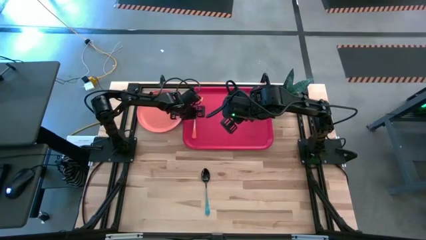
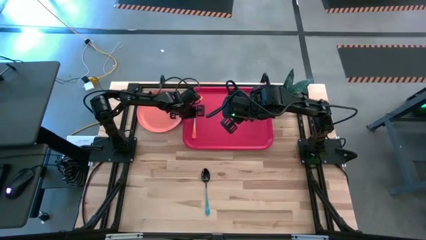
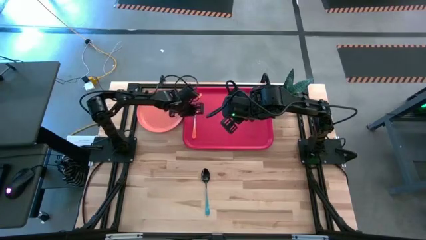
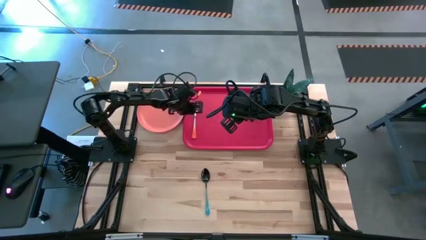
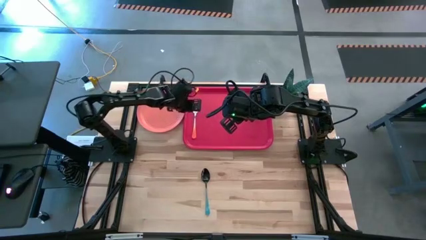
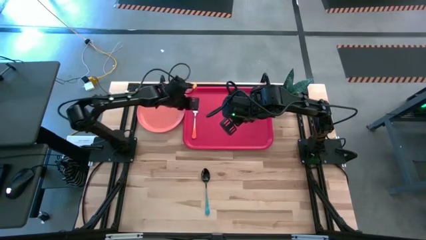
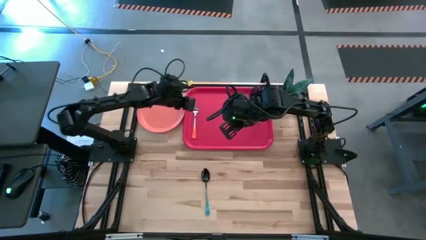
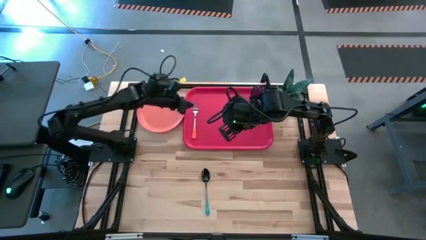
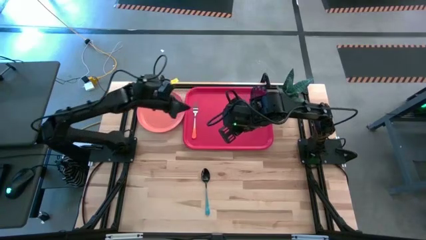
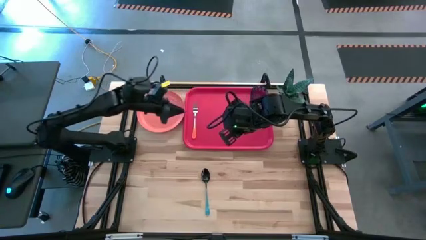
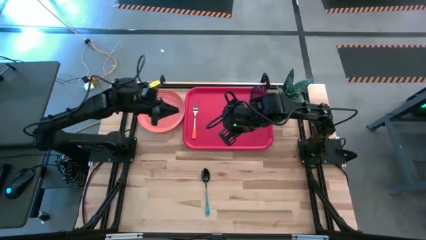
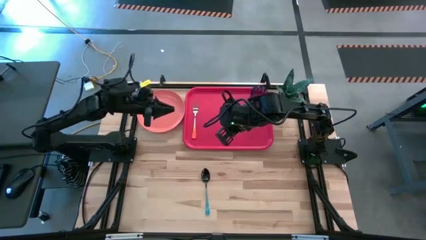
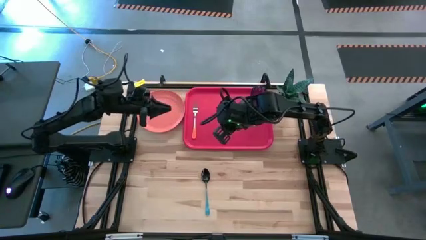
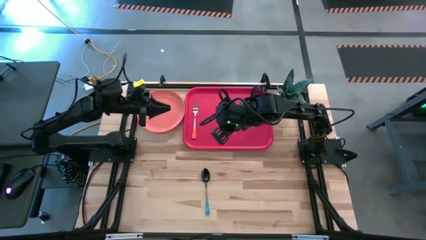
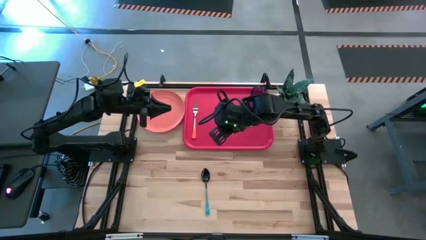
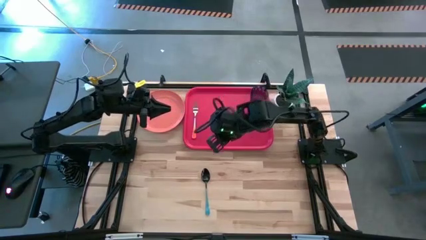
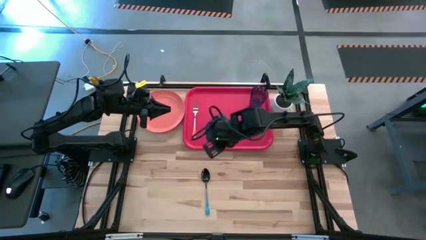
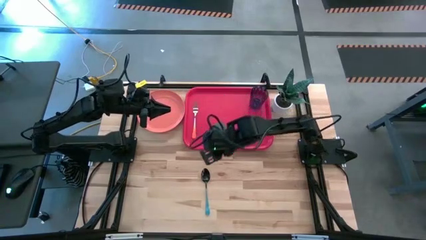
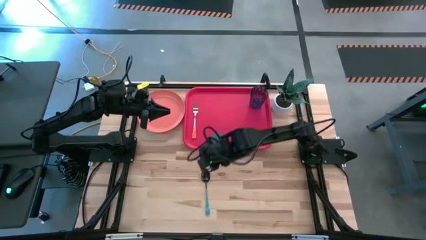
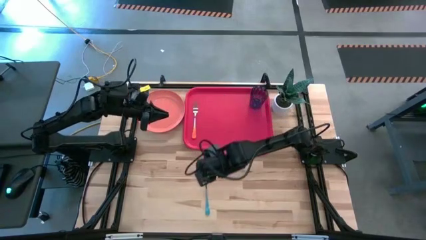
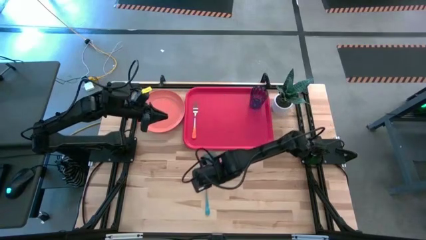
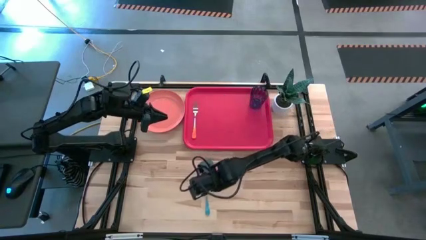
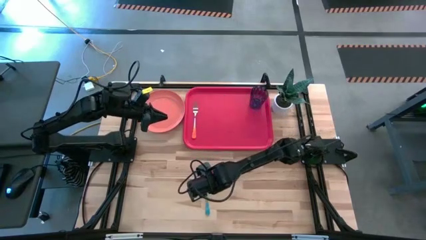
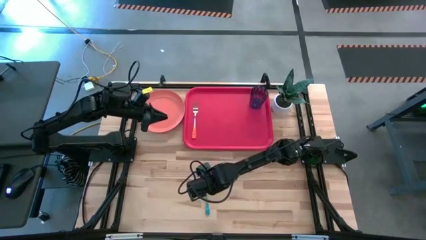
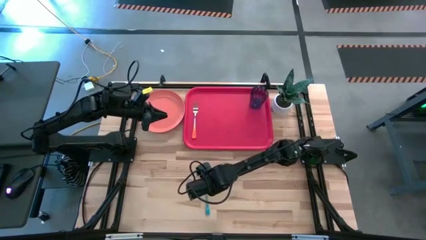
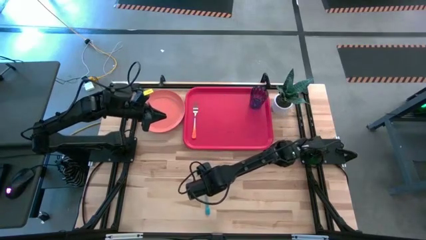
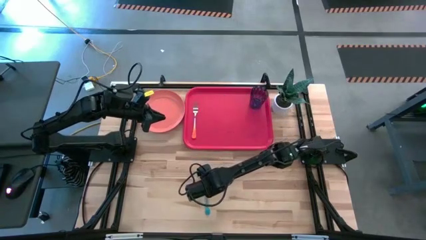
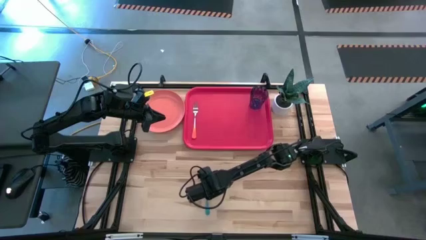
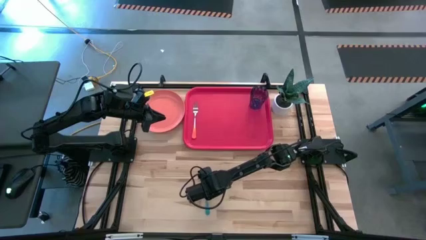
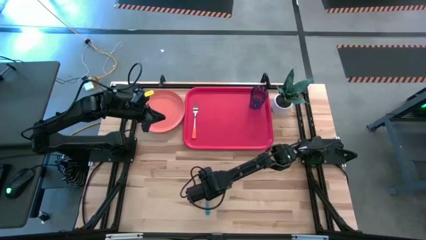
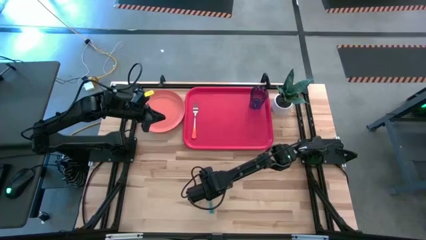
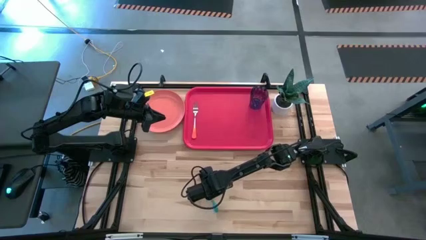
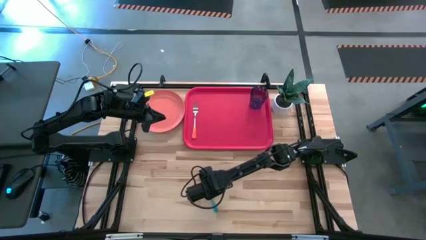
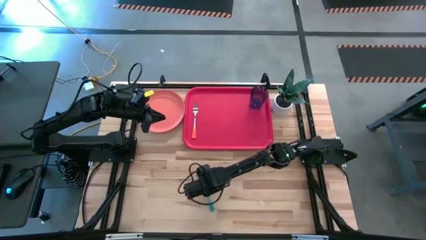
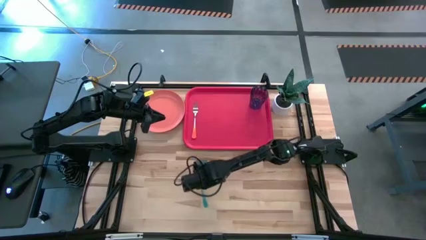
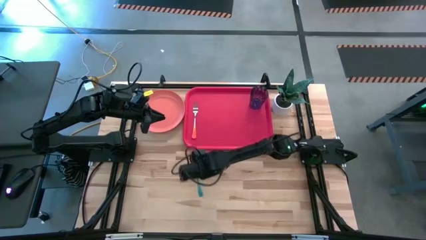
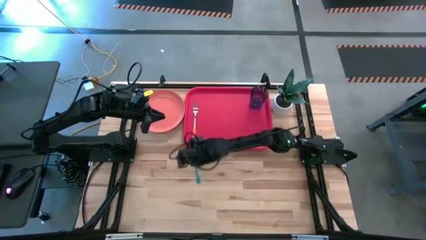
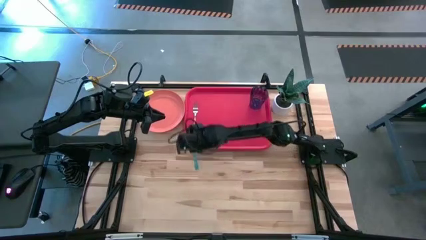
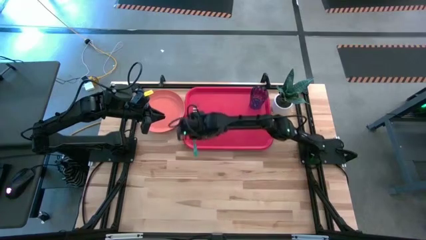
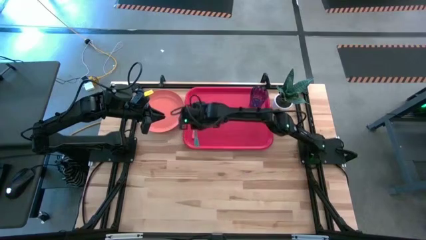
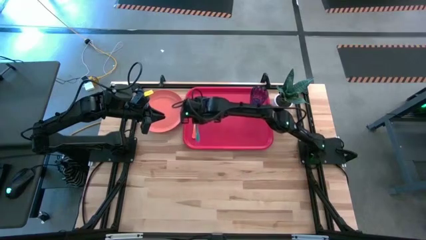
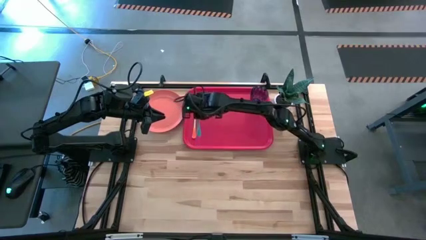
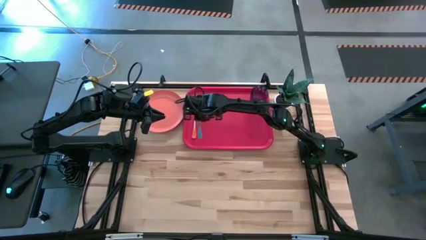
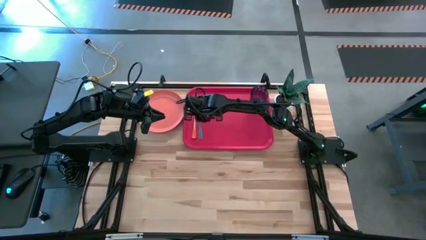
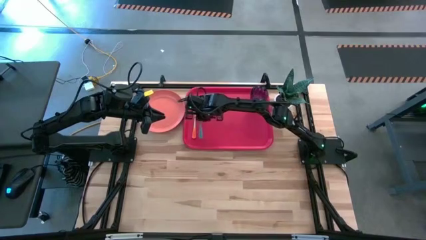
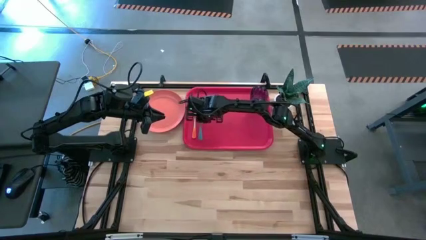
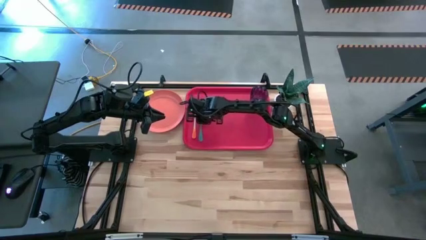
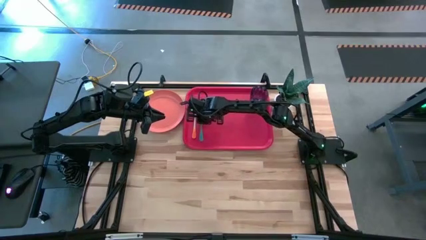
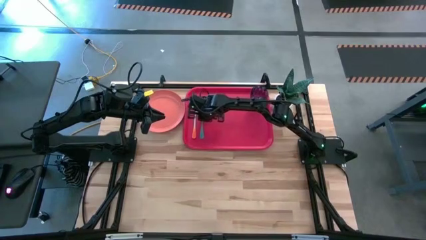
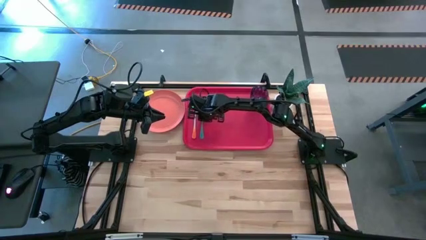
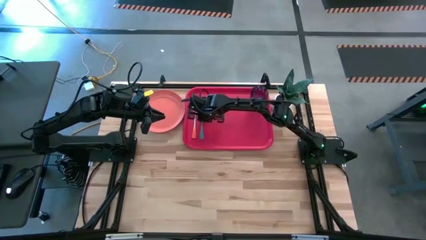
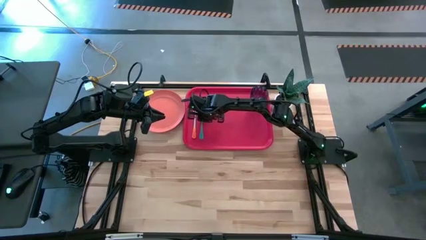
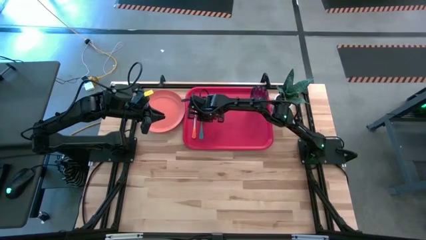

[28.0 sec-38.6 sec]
Task: Pick and place plate/cup/fork/spoon on tray
Put the spoon on the serving tray to the right of the fork

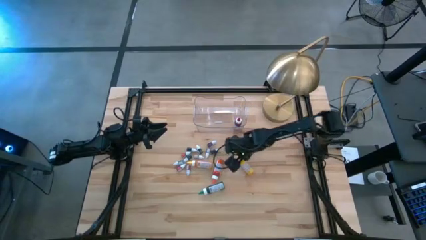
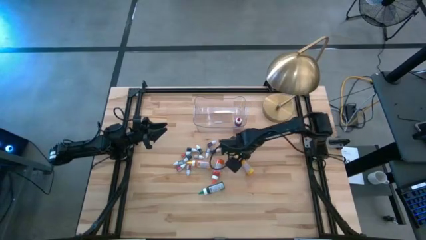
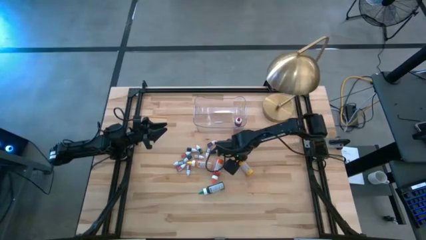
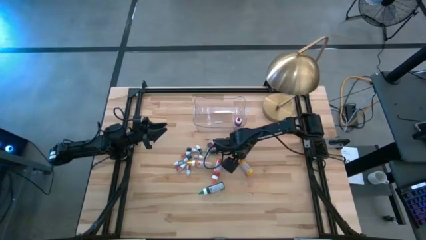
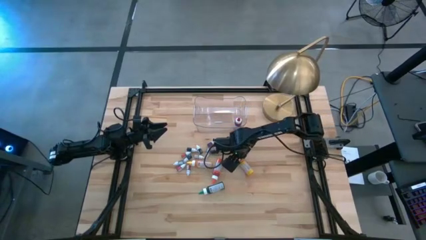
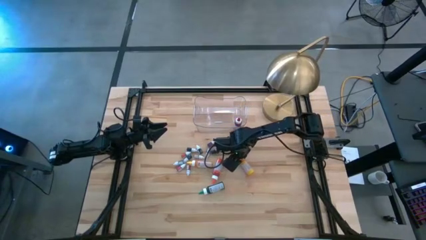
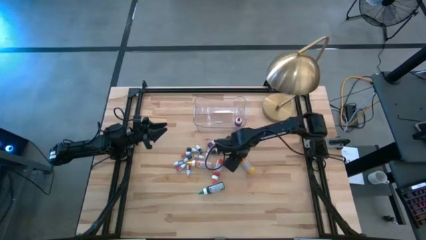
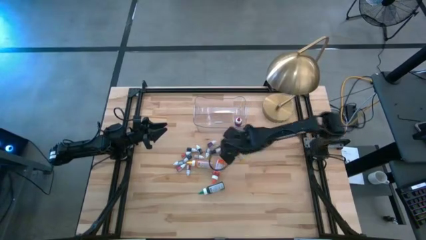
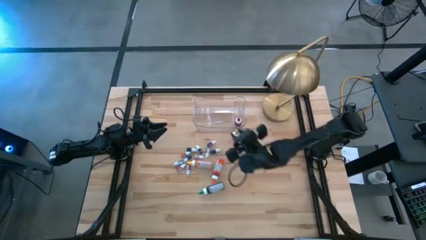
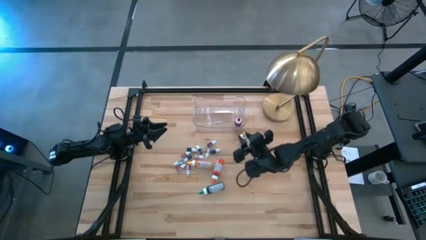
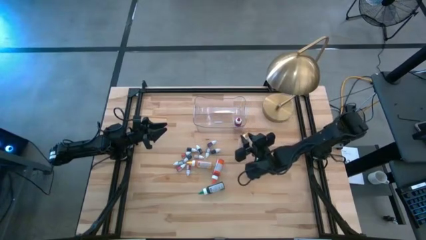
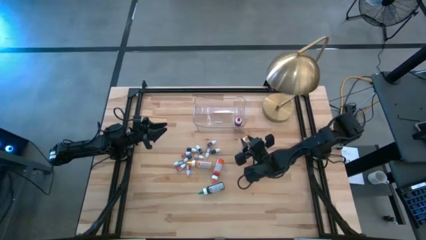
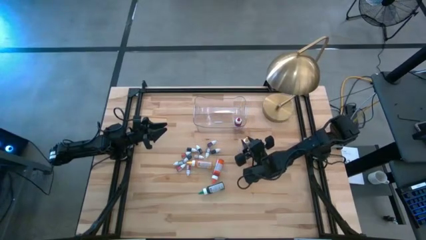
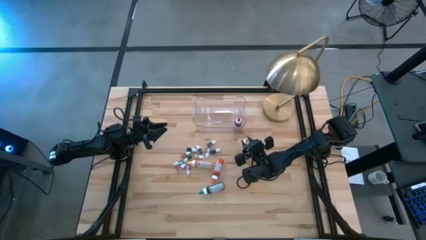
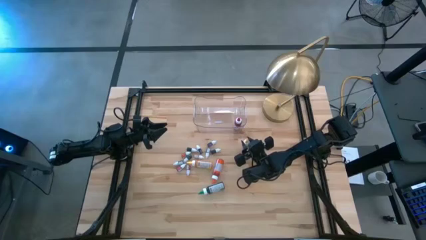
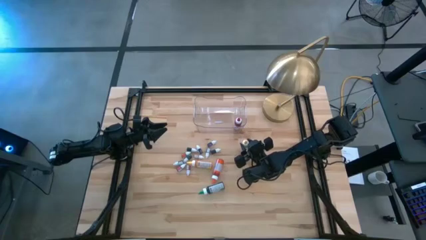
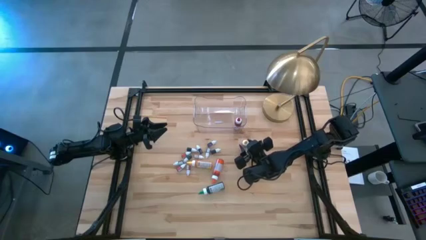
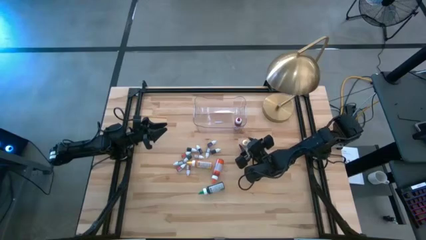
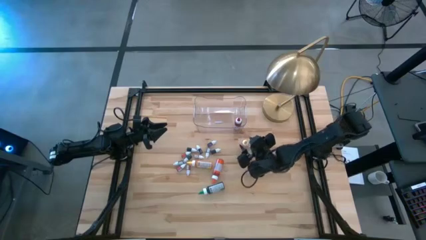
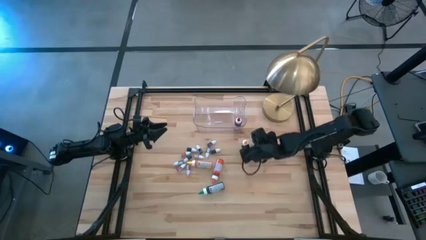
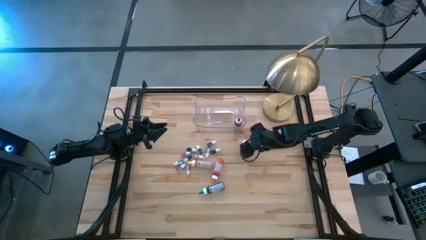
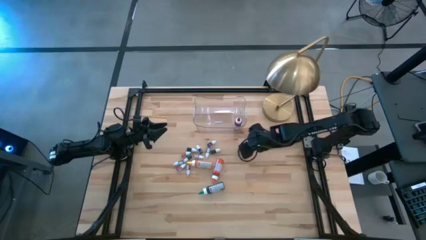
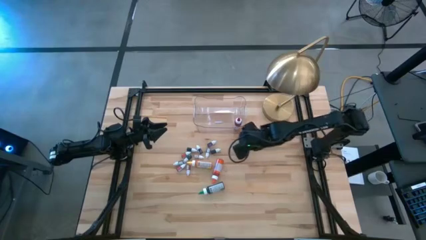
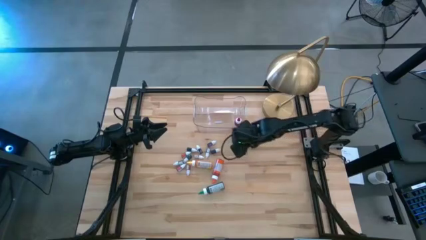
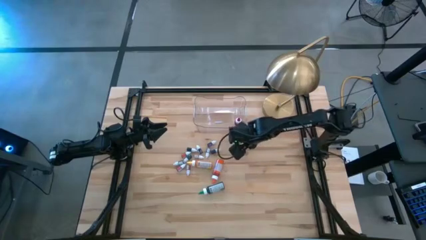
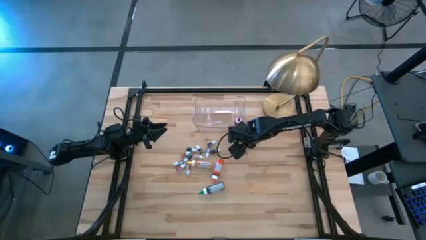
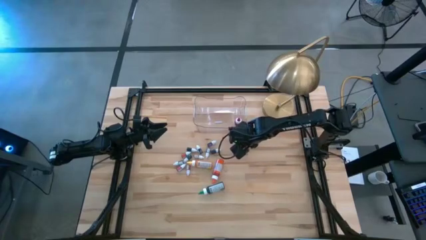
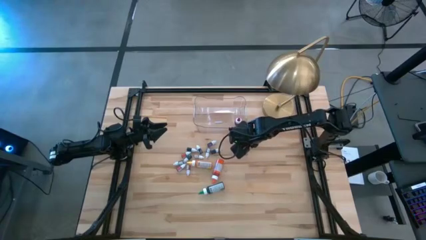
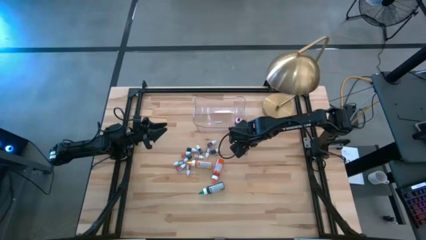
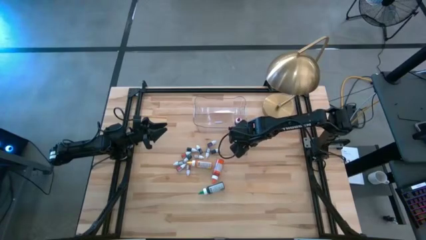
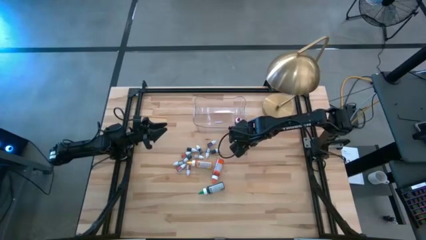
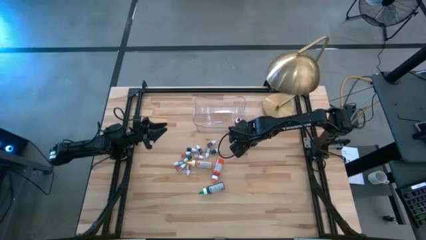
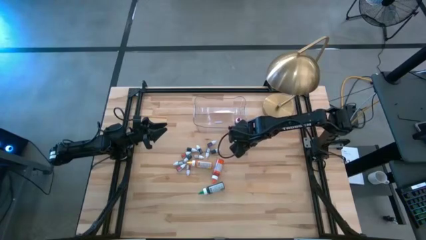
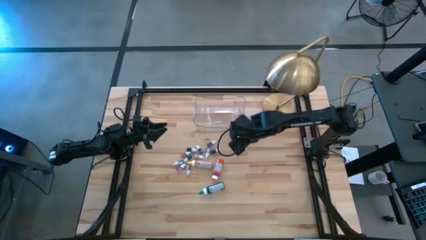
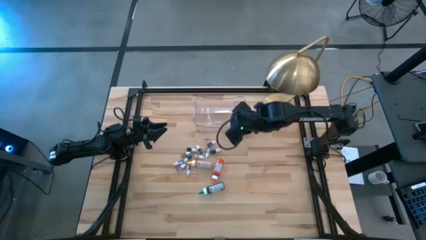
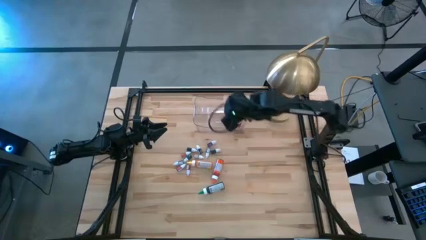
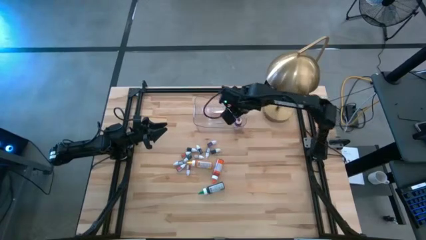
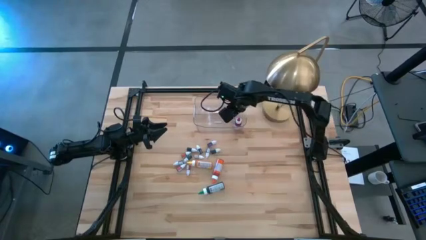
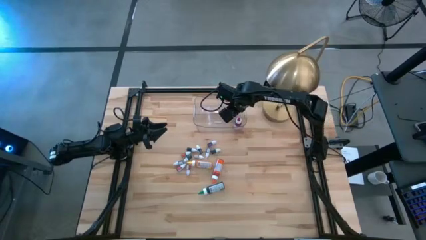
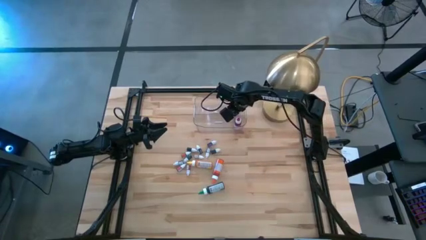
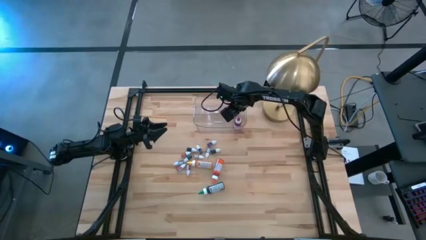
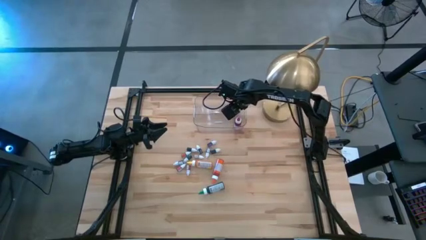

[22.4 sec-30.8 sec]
Task: Pick & Place food coloring
Put the center big yellow food coloring bottle into the transparent bin
